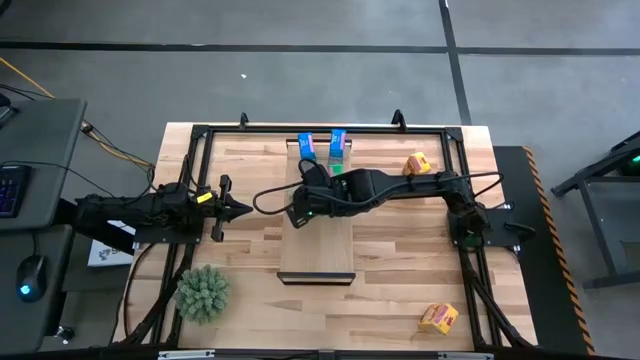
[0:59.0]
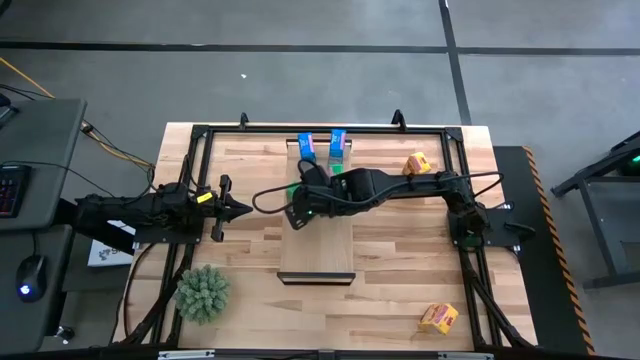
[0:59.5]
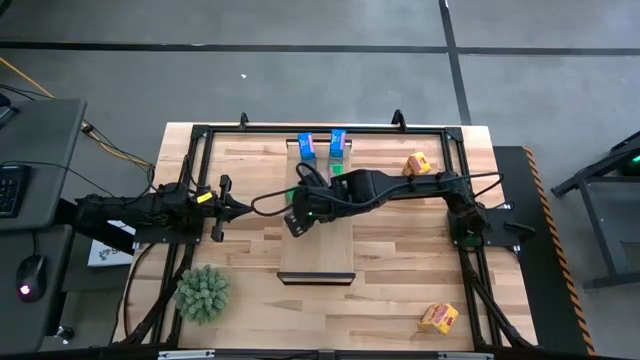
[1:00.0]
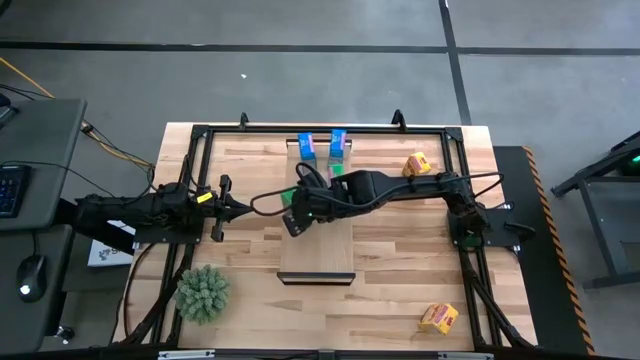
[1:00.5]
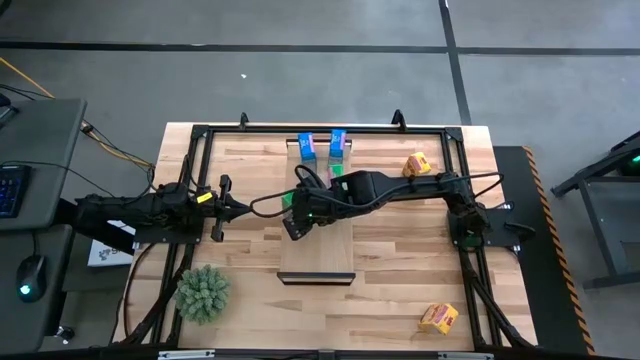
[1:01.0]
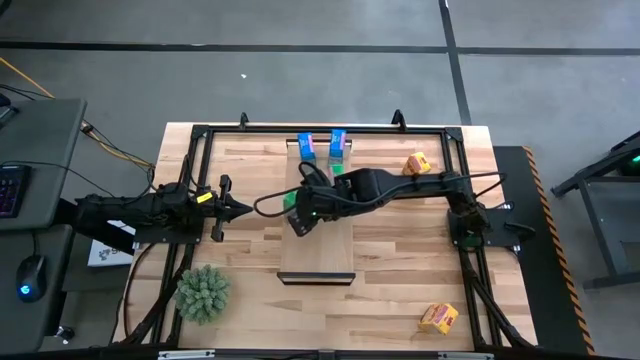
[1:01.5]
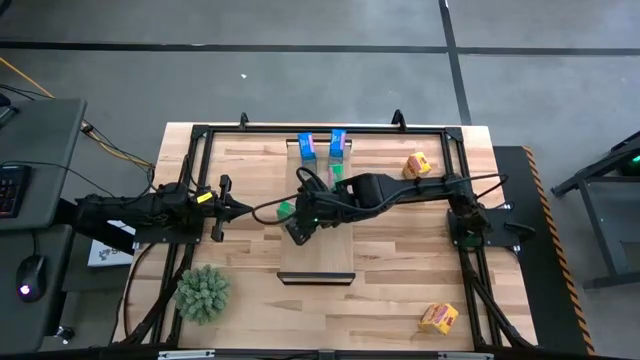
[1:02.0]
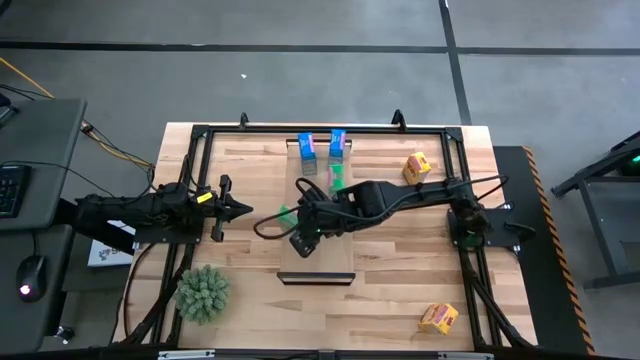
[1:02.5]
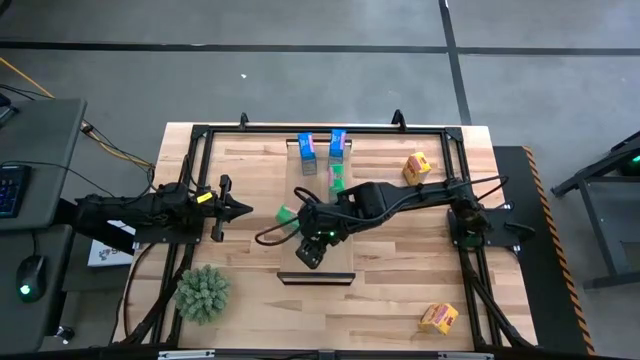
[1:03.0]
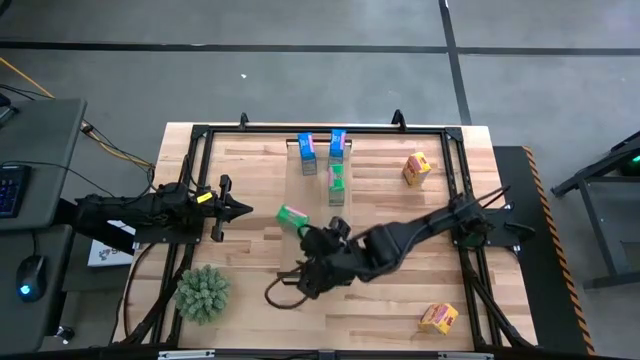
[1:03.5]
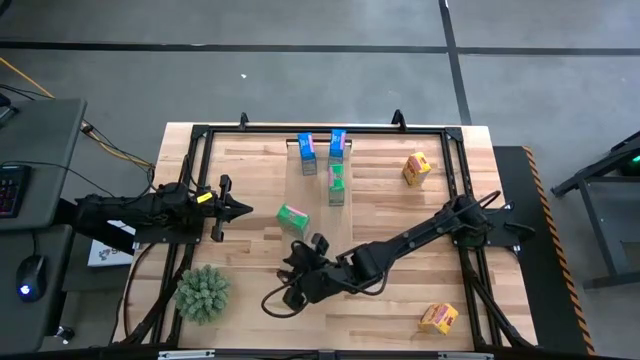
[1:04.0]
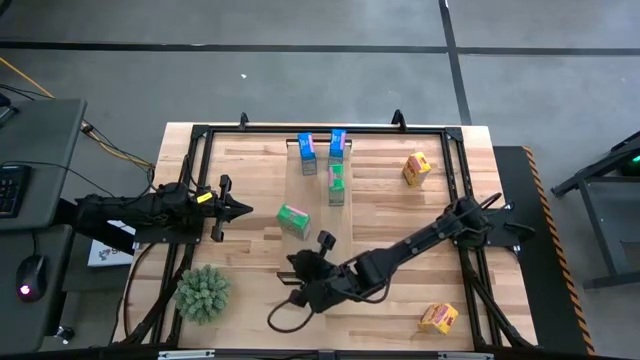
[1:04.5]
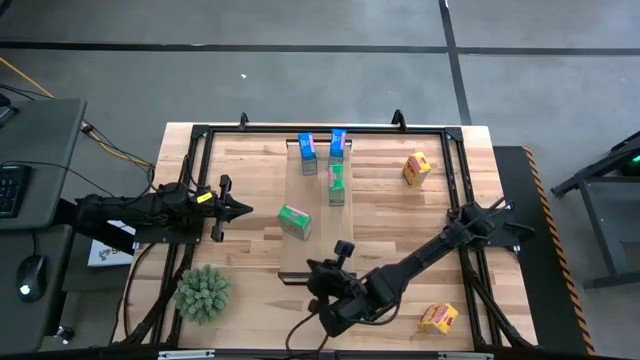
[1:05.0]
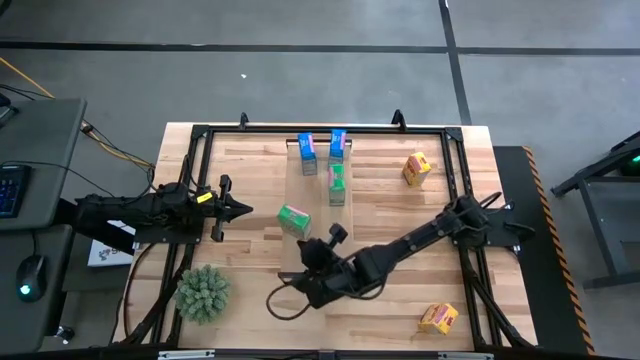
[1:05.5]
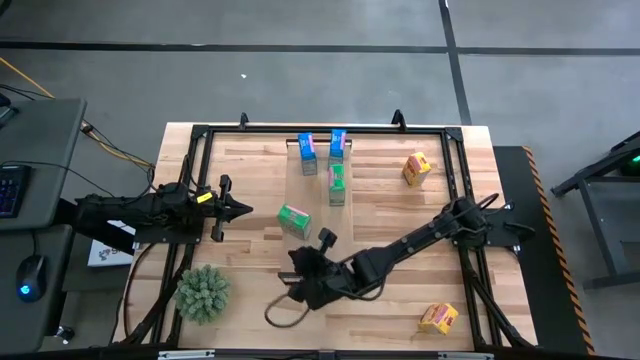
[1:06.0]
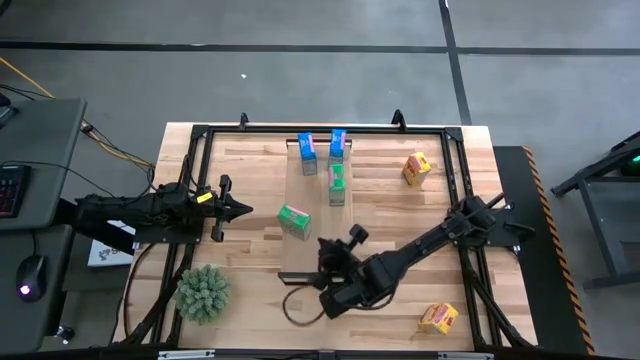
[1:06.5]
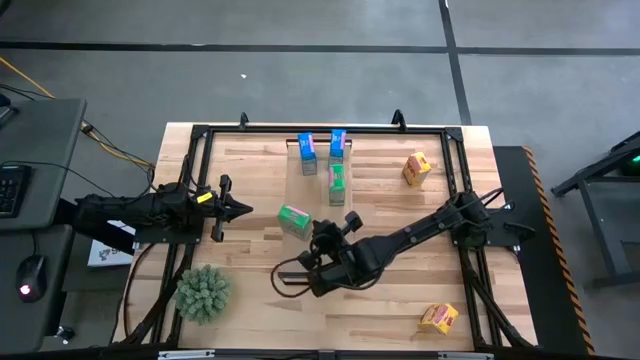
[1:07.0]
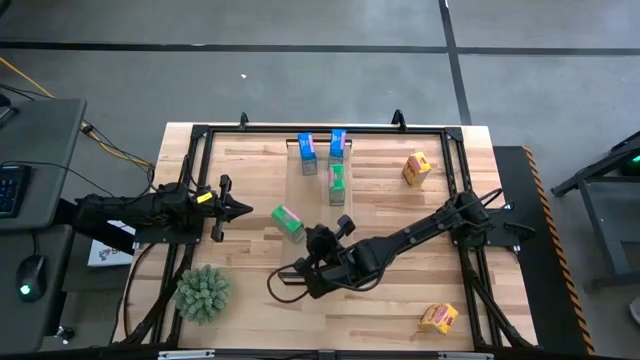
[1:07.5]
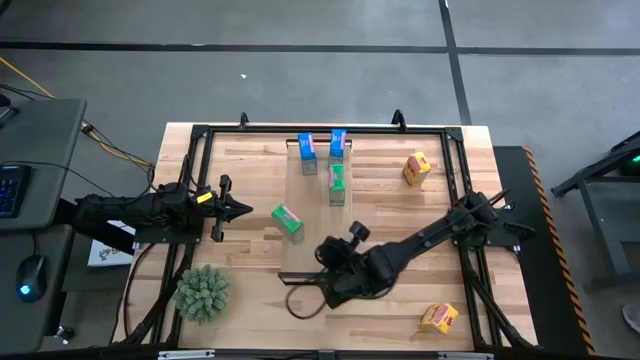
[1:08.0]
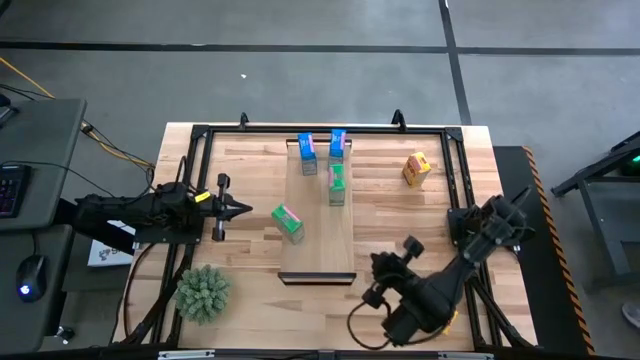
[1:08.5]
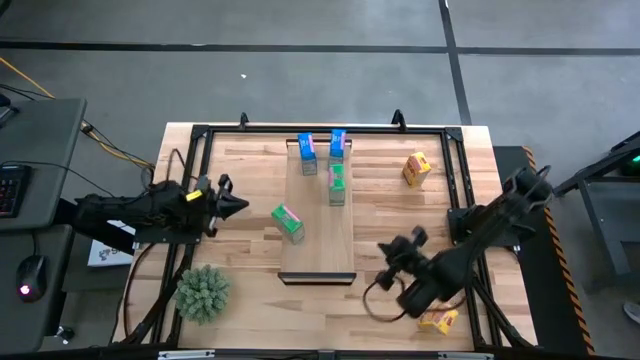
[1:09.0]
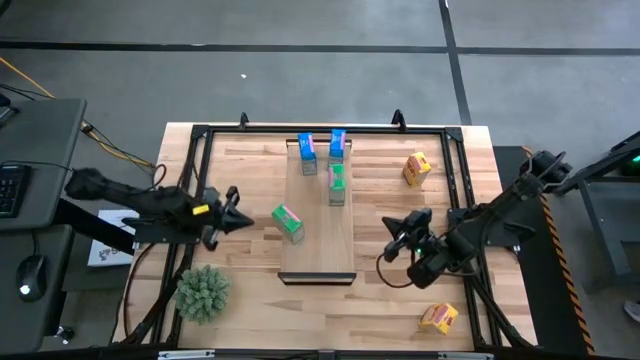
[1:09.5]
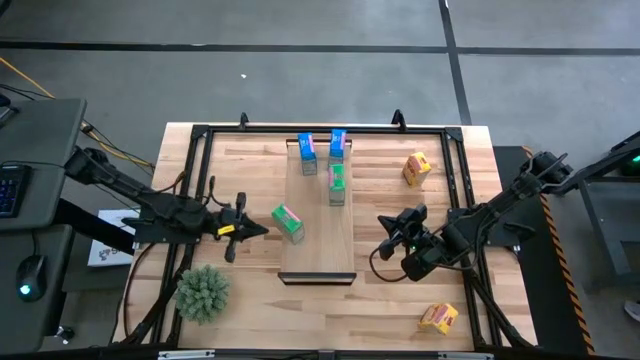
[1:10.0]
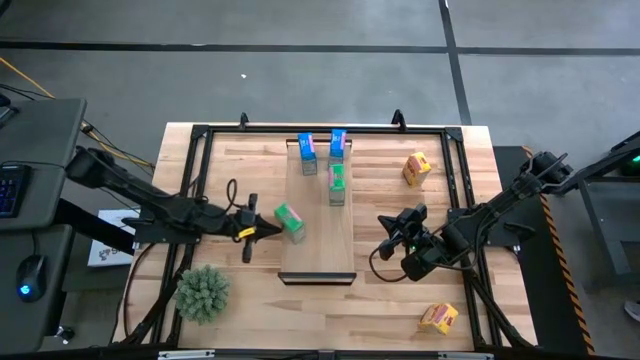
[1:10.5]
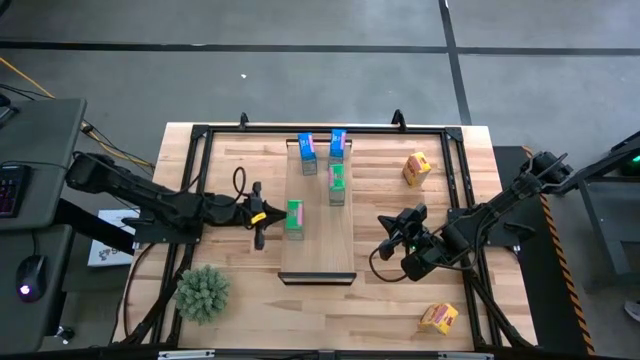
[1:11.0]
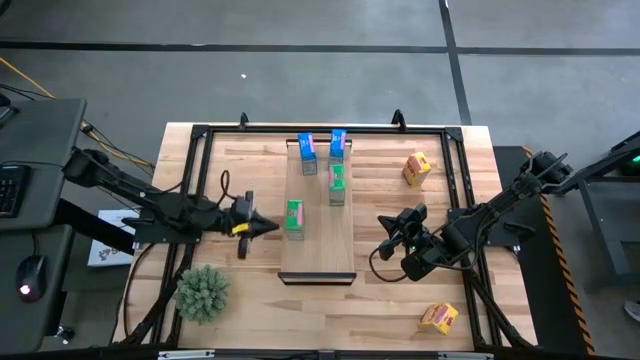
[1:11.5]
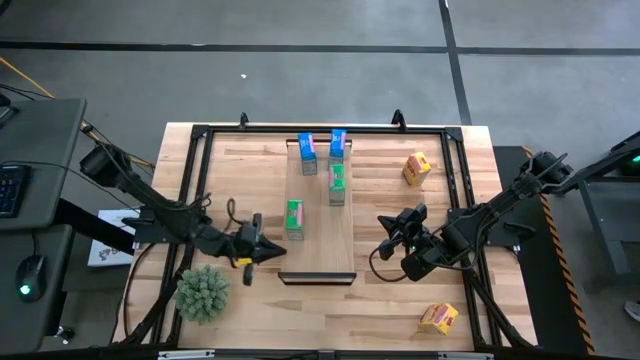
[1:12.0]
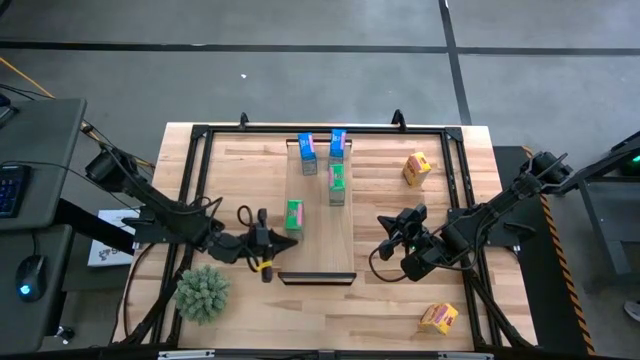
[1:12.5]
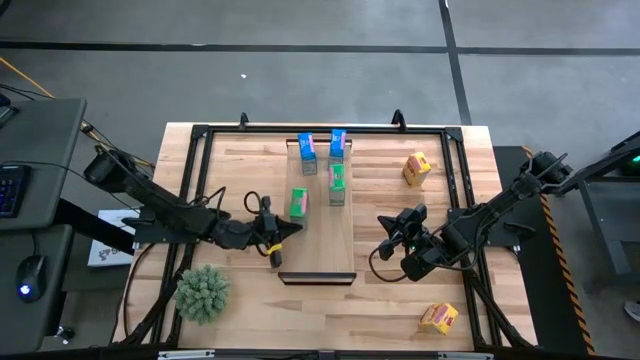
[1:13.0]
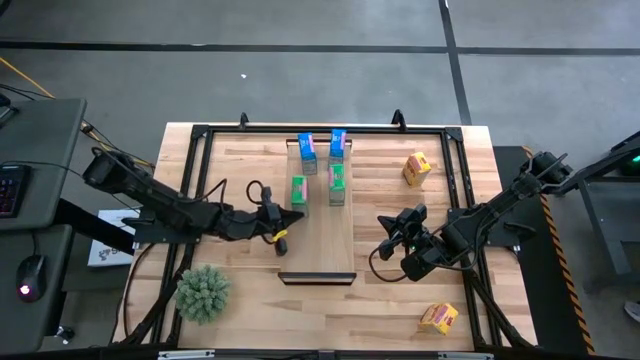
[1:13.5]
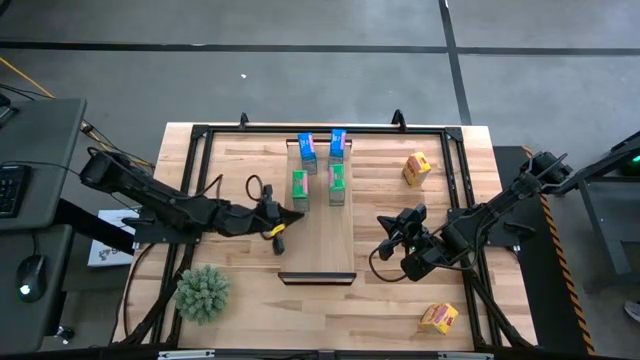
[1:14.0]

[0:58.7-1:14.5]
Task: Stack cereal on shelf
Put the green cereal box on the shelf aligned with the other green cereal box

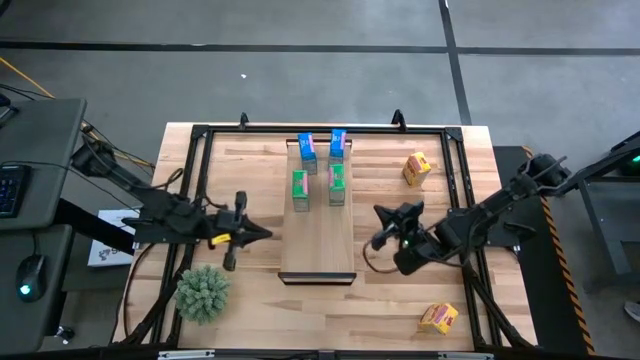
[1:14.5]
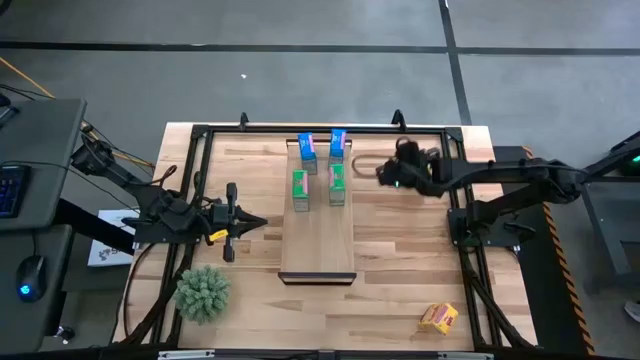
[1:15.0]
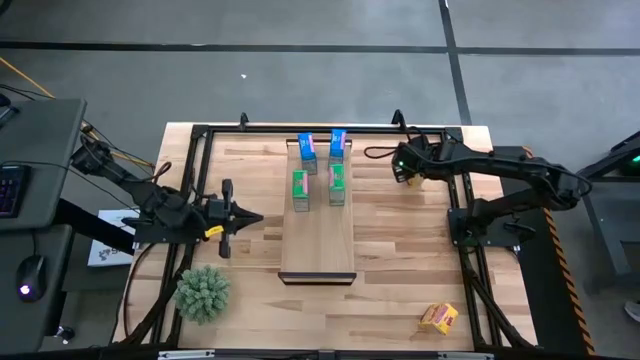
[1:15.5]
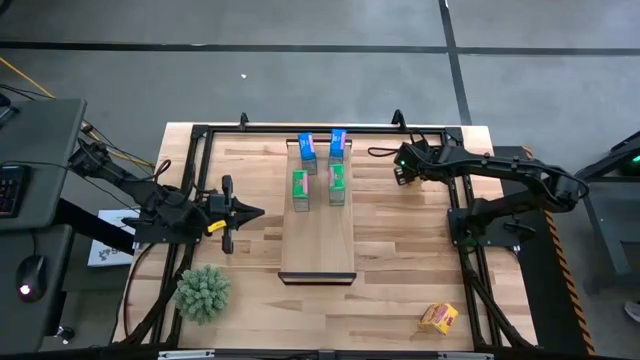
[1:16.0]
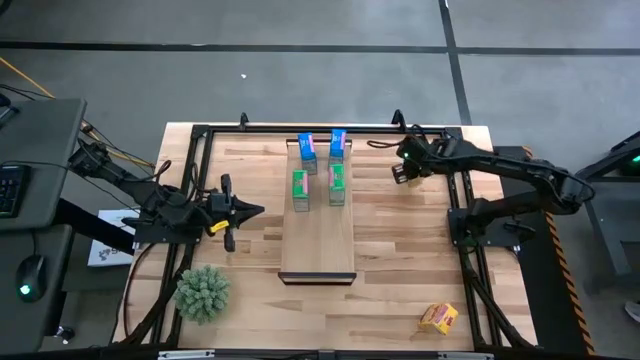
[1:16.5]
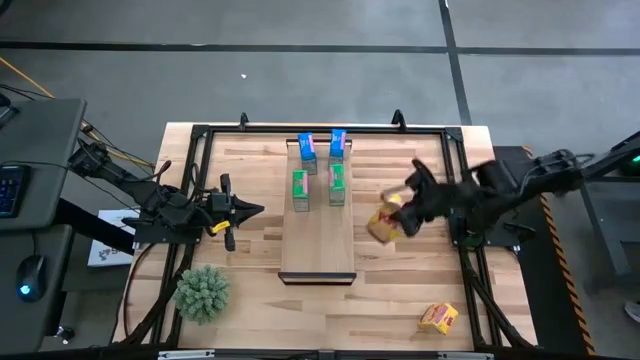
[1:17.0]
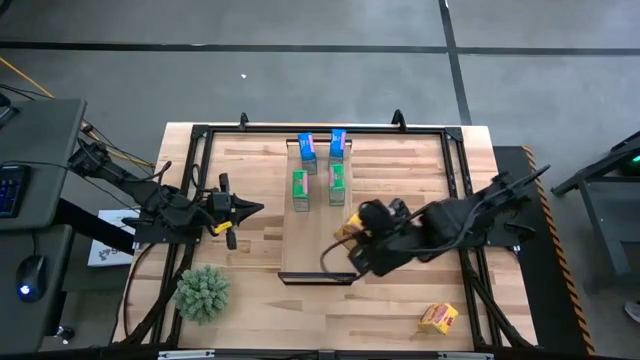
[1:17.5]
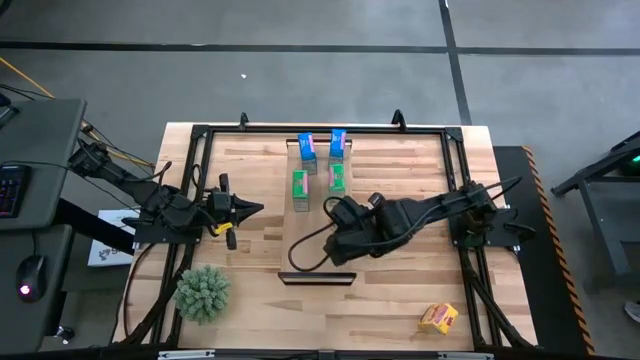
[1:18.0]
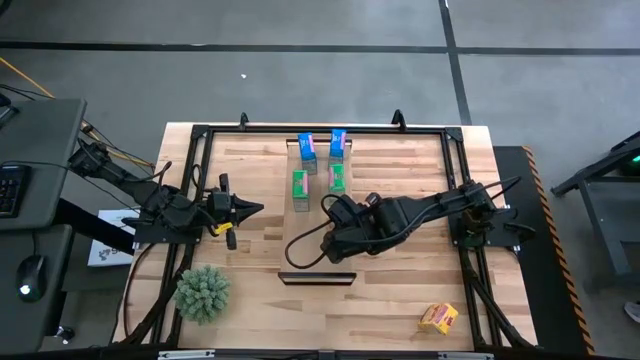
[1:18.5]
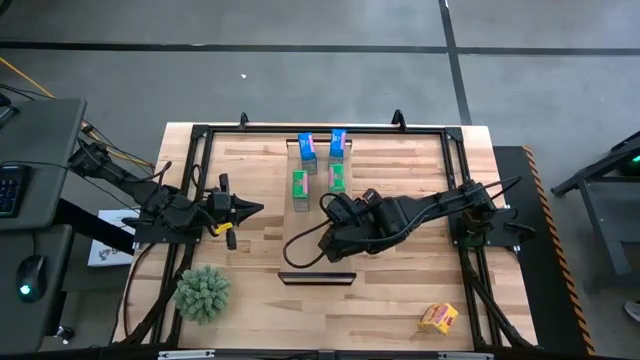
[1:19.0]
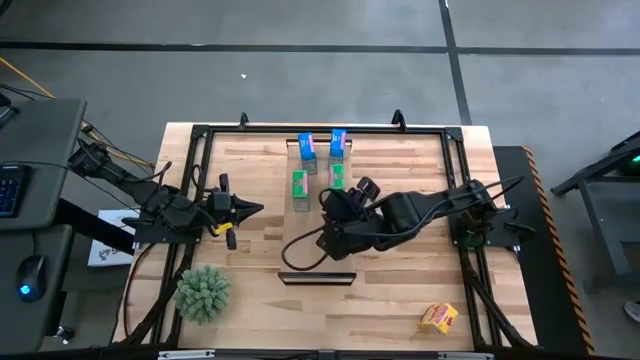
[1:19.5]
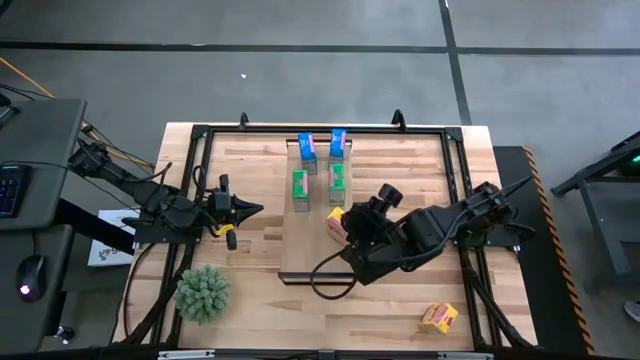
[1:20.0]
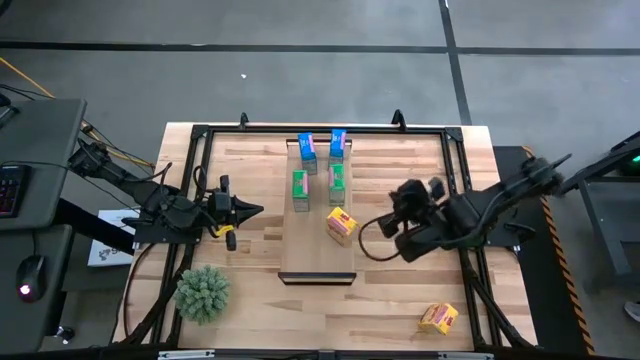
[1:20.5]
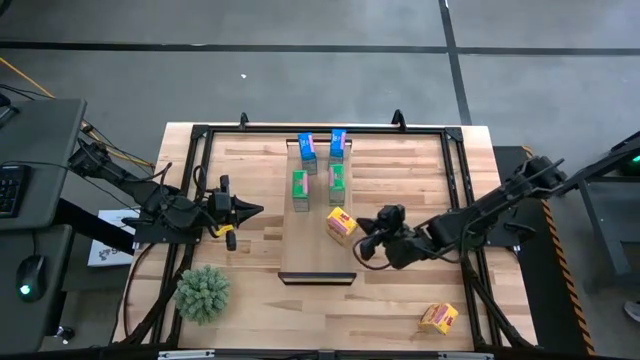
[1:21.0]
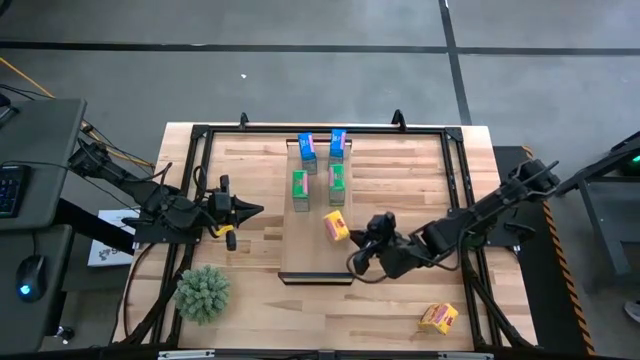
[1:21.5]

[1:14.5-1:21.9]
Put the top yellow cereal box on the shelf
